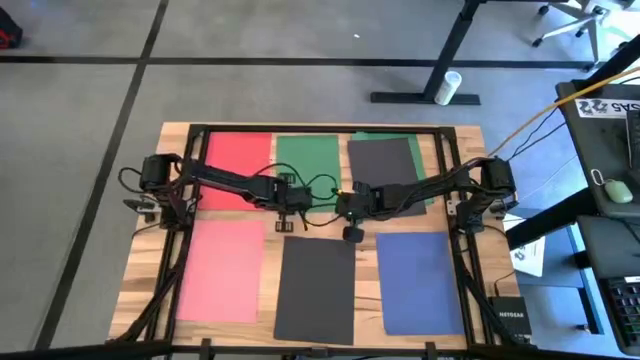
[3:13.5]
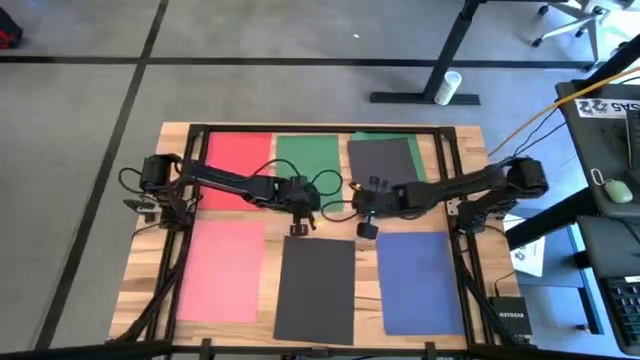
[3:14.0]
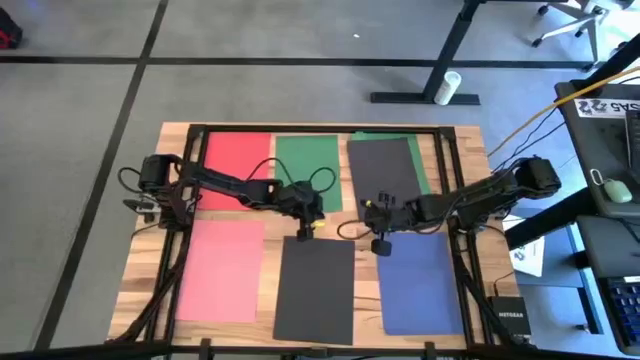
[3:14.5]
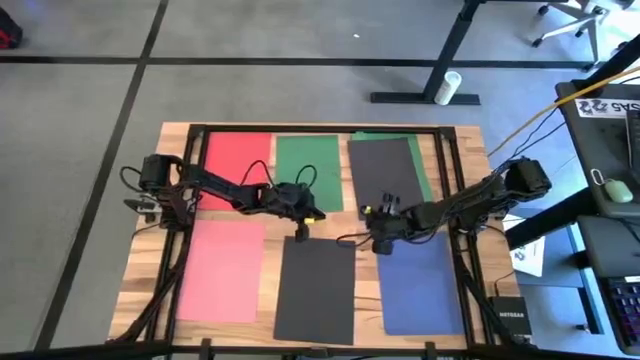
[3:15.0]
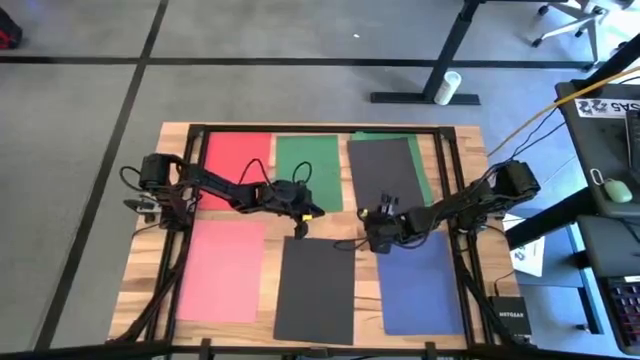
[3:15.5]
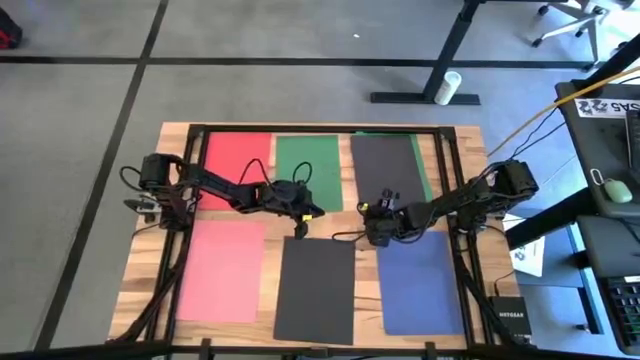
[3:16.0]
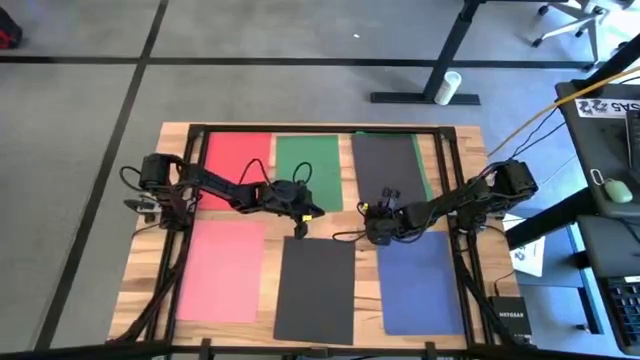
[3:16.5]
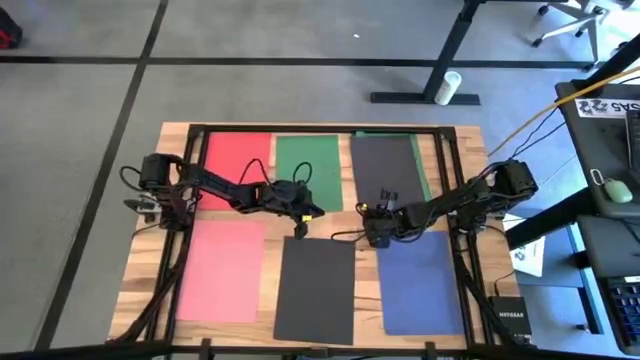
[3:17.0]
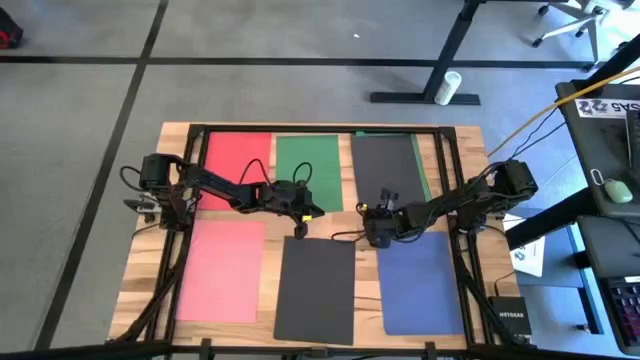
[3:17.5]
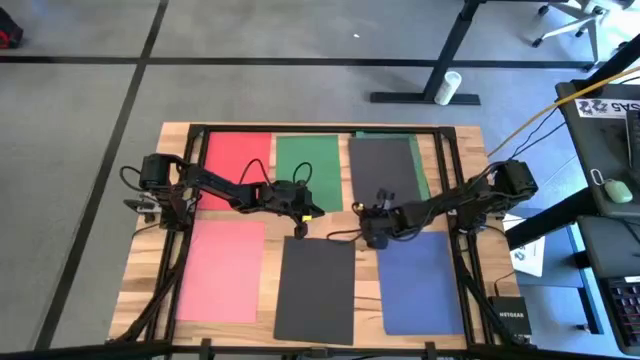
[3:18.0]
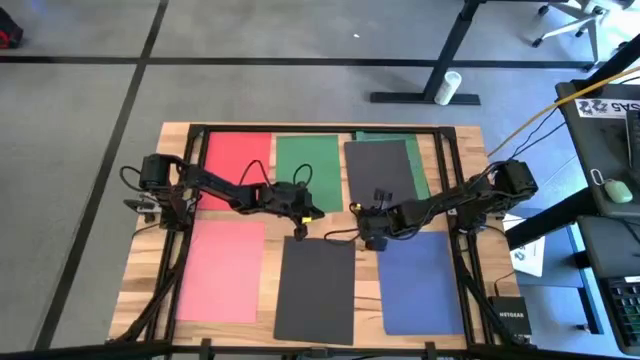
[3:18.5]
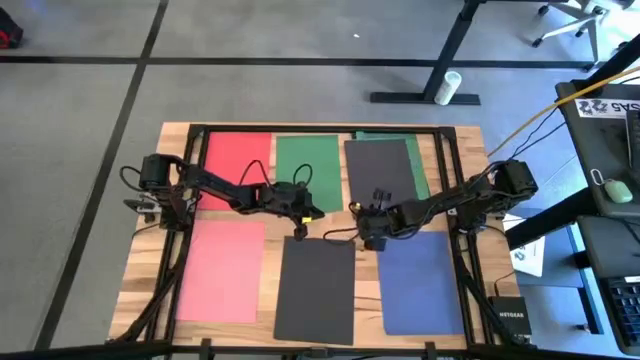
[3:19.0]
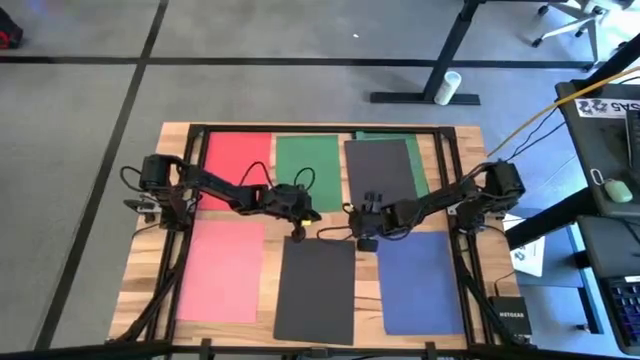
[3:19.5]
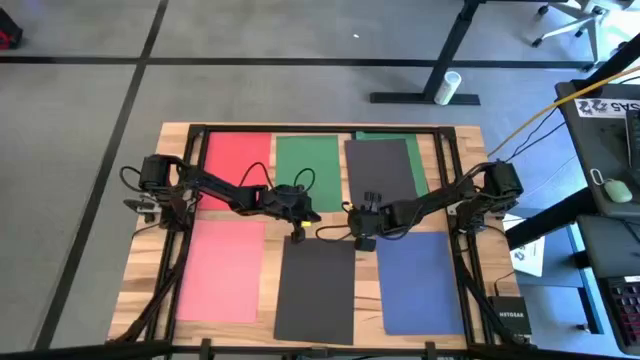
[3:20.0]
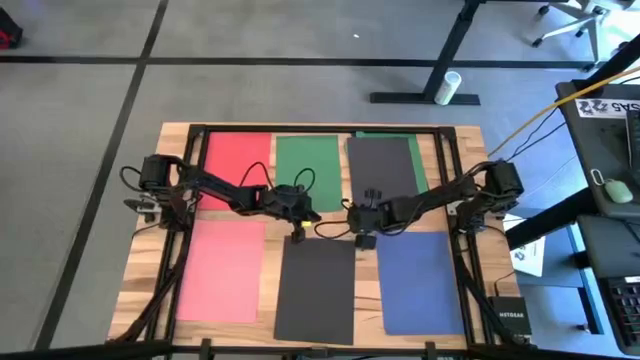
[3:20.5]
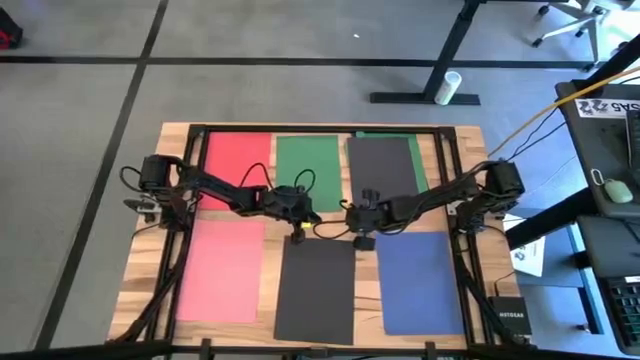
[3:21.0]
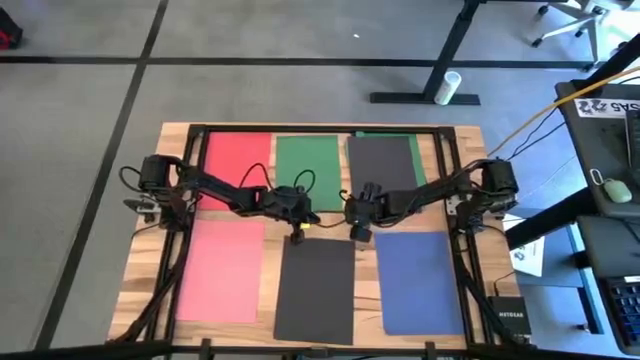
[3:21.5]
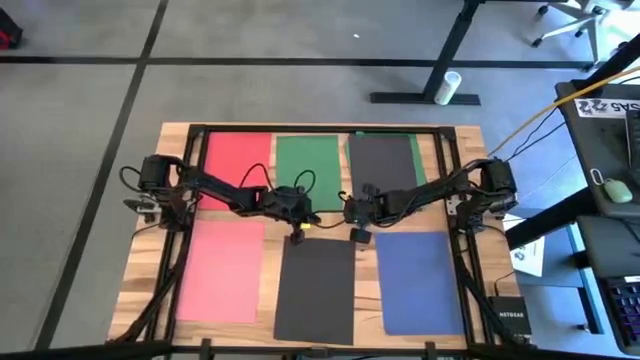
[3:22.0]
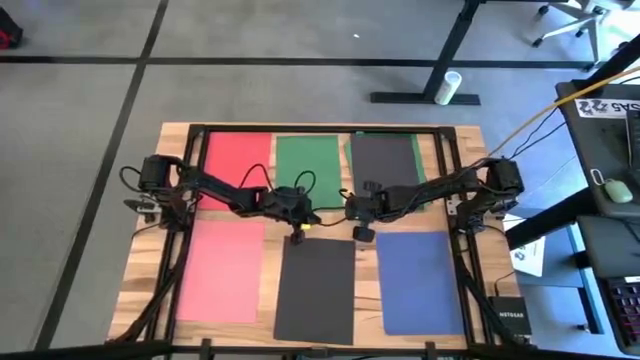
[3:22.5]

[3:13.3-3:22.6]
Task: Organize paper
Stack the black paper on top of the black paper

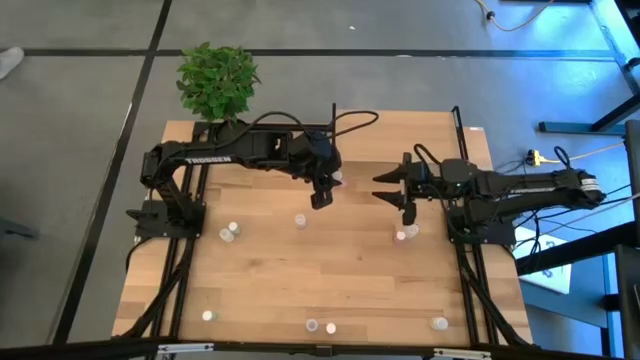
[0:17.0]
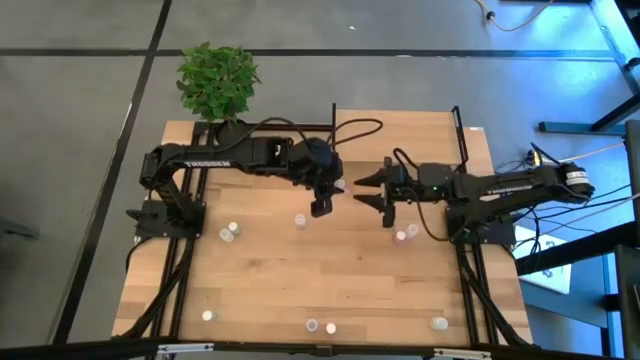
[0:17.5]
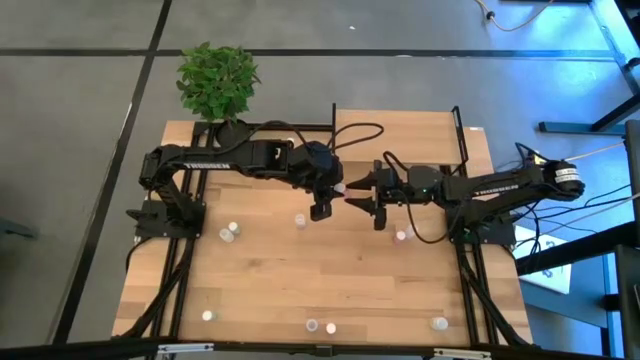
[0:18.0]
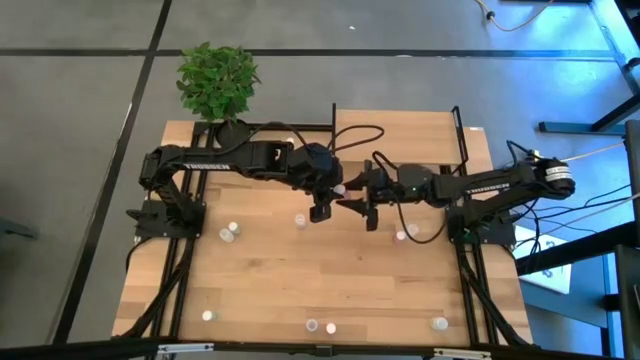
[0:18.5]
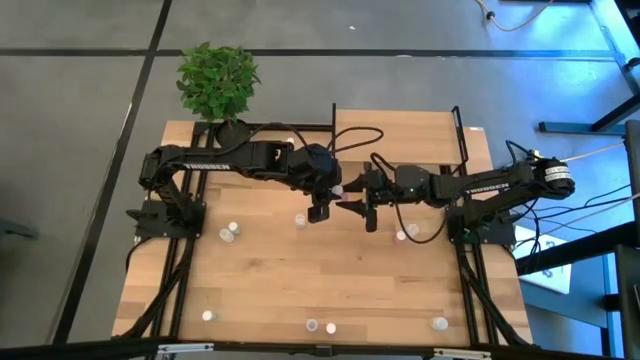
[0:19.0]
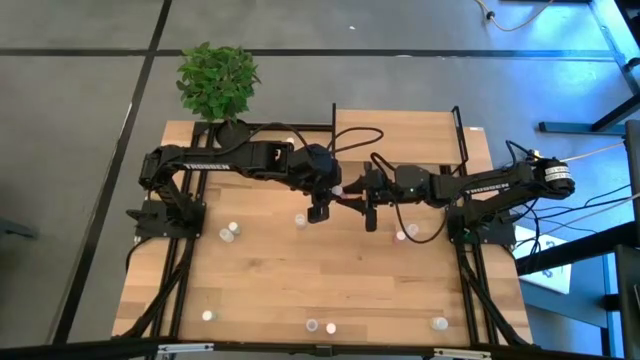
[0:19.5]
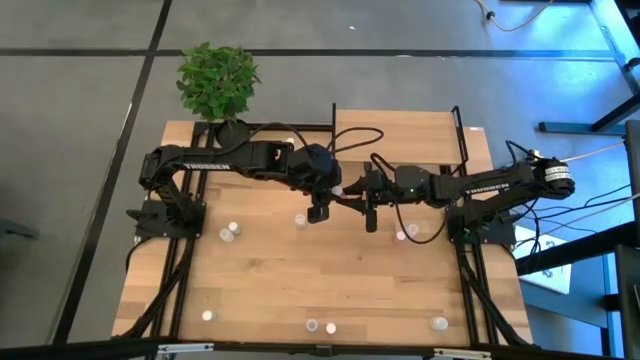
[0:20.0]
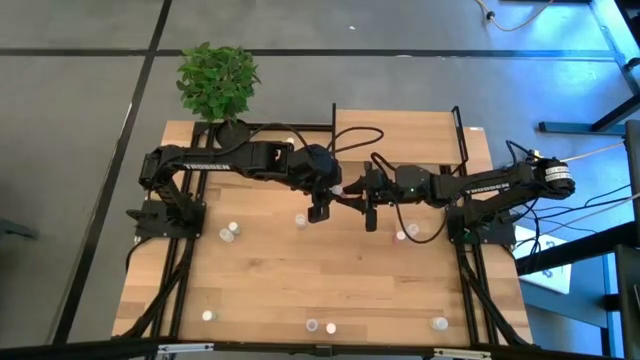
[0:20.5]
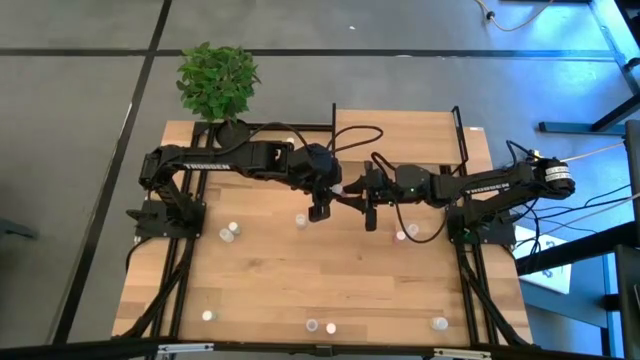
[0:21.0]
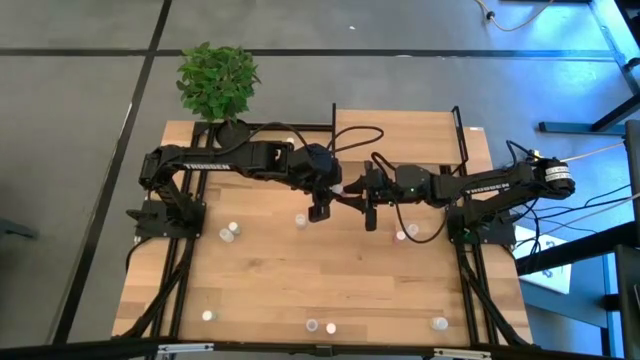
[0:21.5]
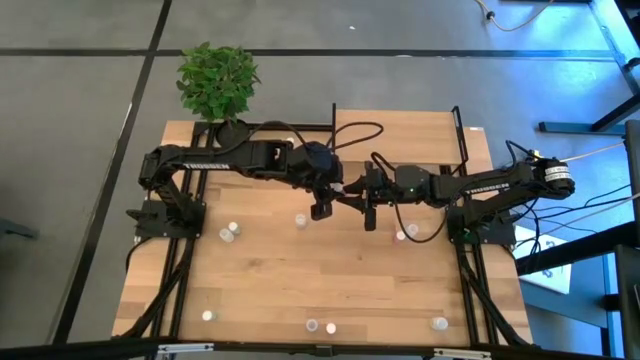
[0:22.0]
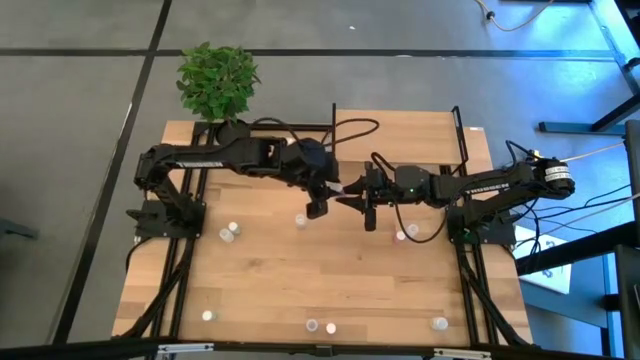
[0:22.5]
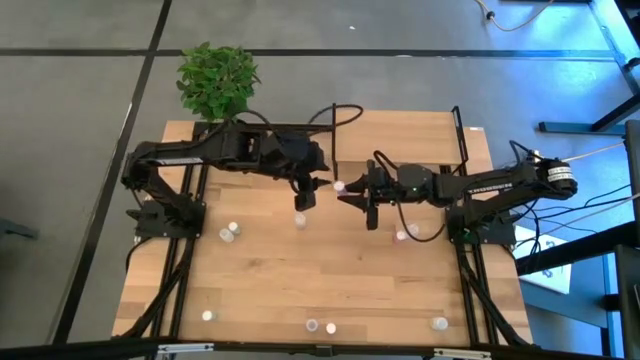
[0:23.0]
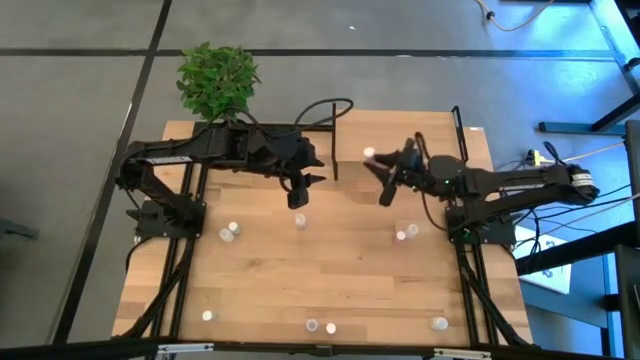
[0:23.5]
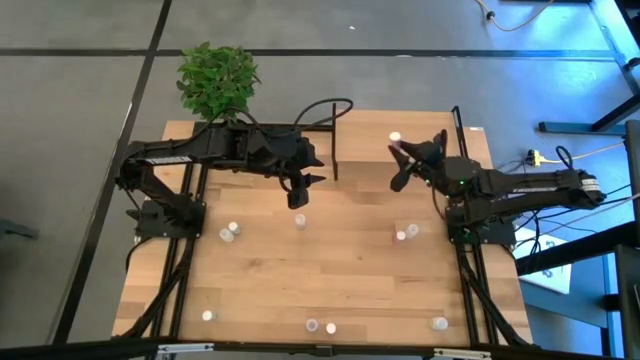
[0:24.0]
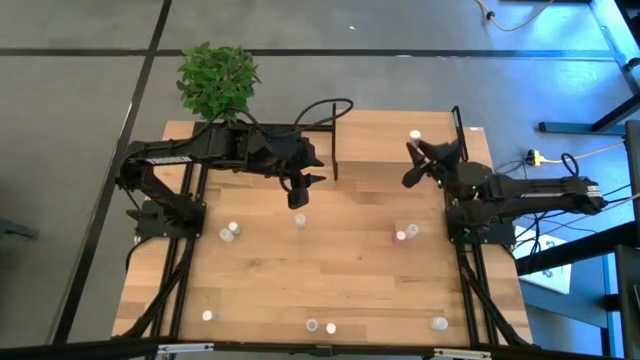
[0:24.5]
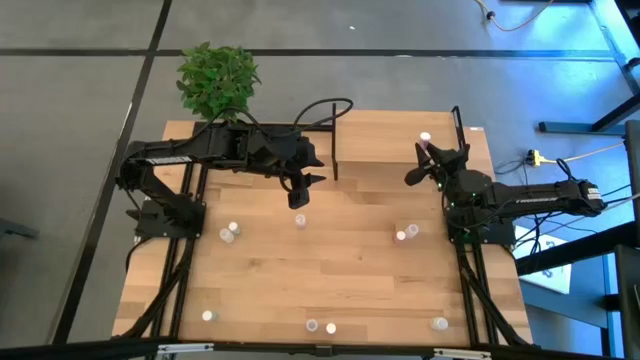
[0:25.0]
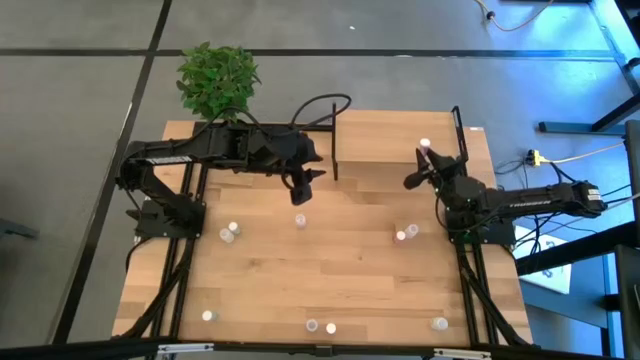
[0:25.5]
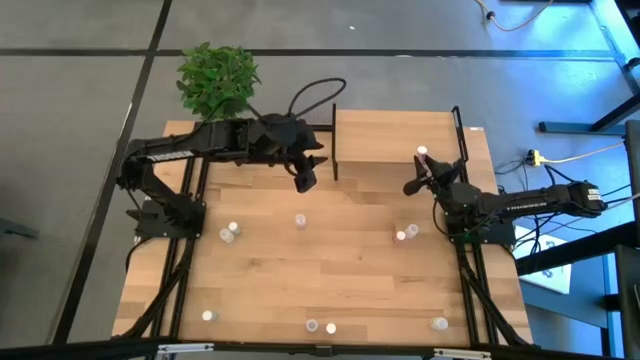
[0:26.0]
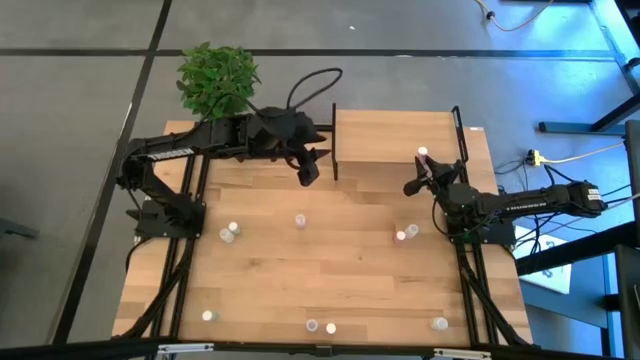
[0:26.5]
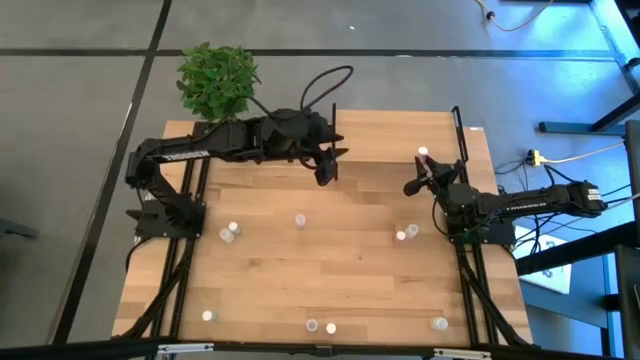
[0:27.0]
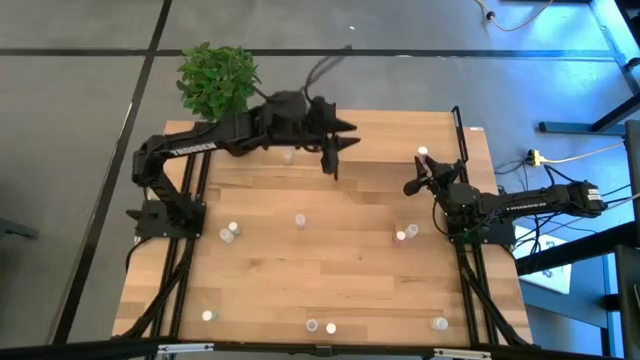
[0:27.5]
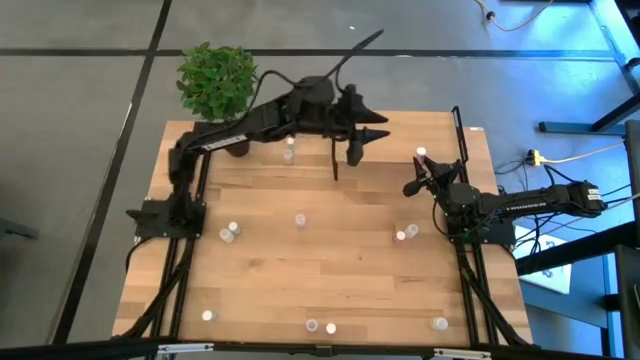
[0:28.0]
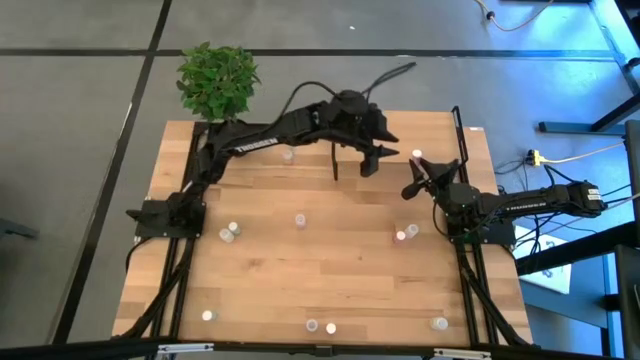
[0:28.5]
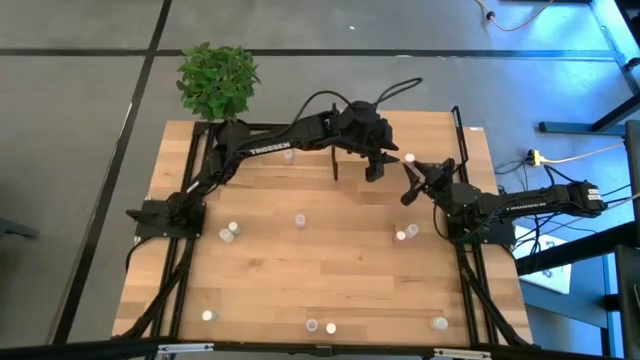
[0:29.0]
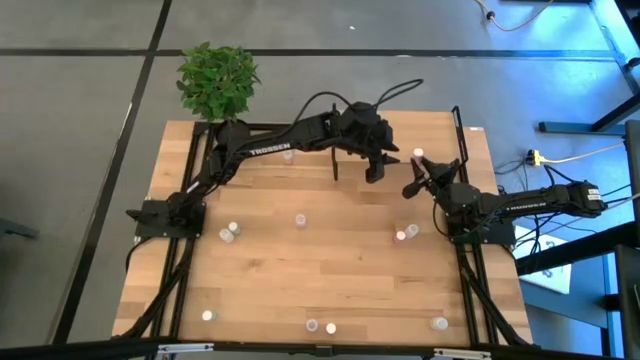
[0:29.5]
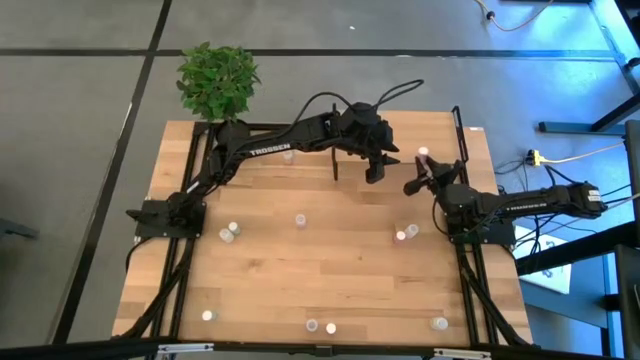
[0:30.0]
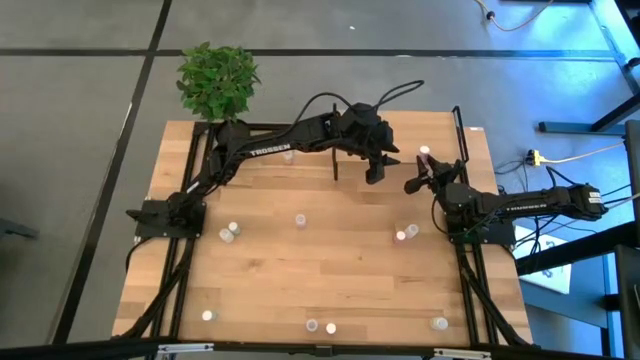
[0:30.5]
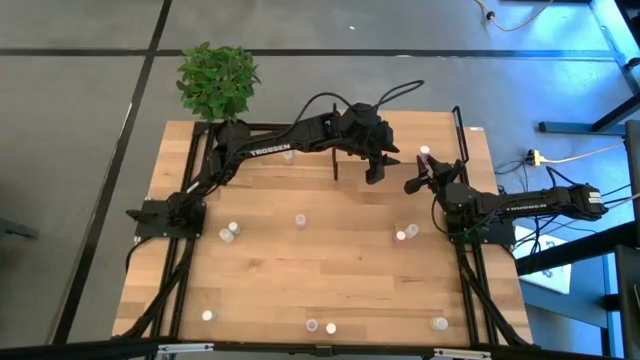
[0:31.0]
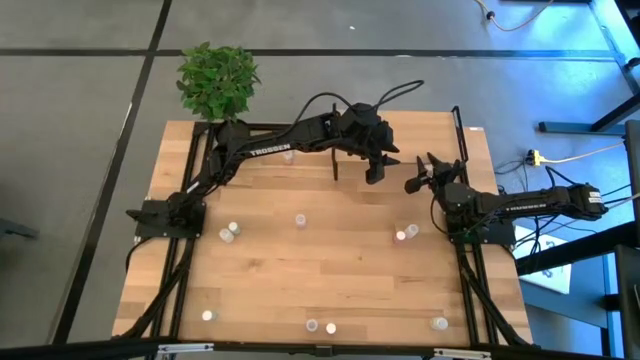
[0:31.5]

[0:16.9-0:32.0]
Task: Pick and place medicine bottles onto shelf by color
Put the top left pink pill bottle on the shelf
